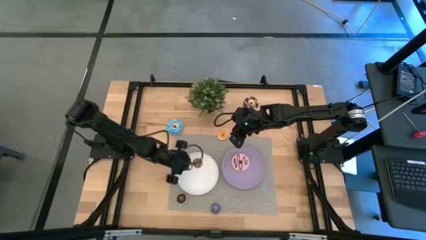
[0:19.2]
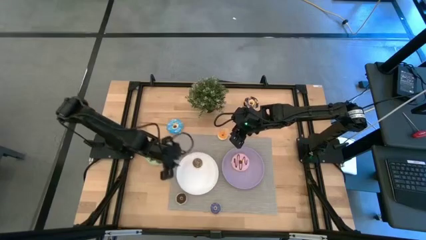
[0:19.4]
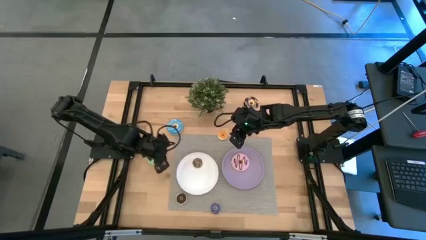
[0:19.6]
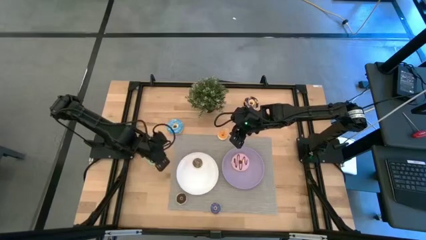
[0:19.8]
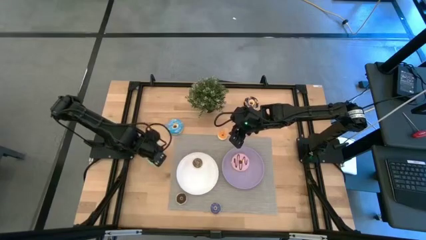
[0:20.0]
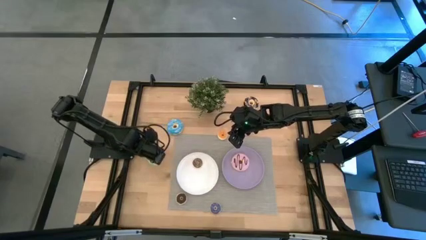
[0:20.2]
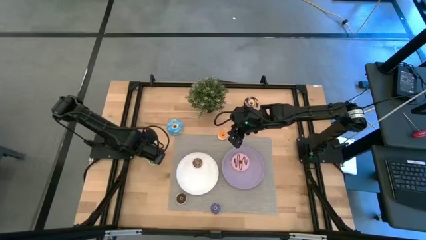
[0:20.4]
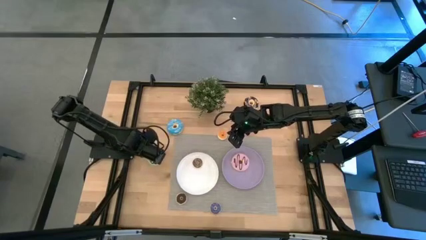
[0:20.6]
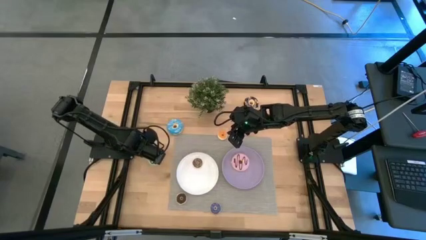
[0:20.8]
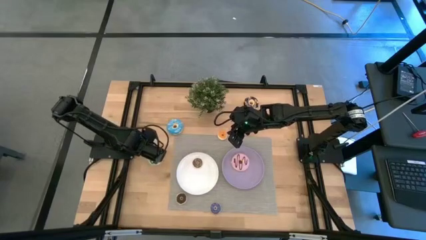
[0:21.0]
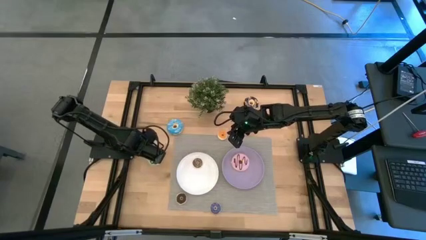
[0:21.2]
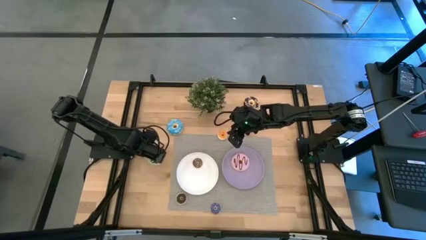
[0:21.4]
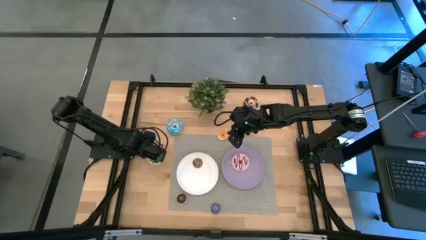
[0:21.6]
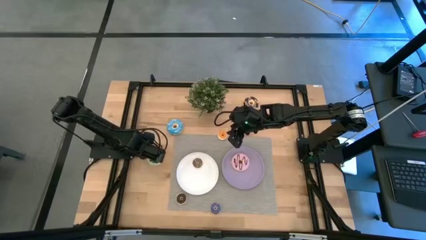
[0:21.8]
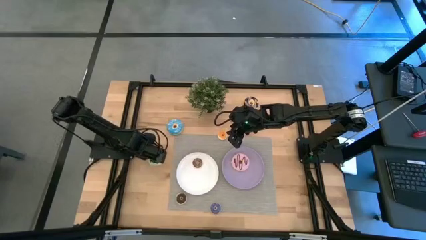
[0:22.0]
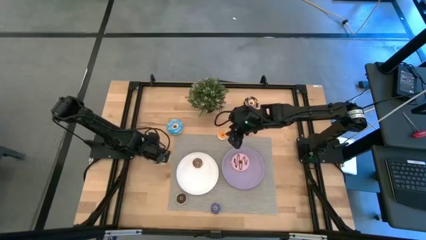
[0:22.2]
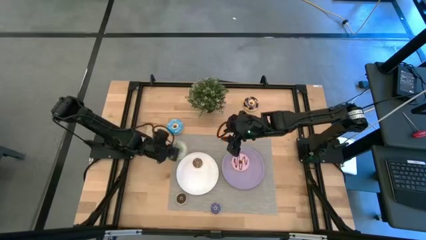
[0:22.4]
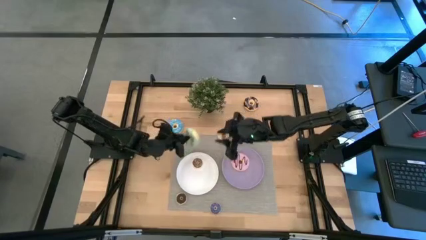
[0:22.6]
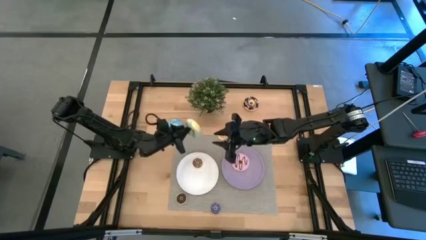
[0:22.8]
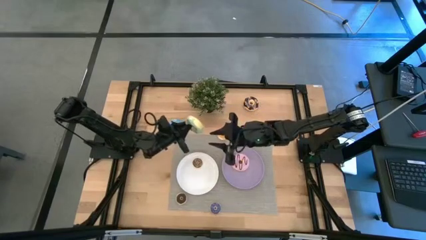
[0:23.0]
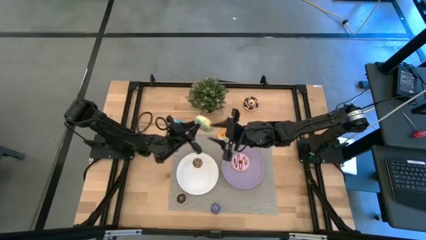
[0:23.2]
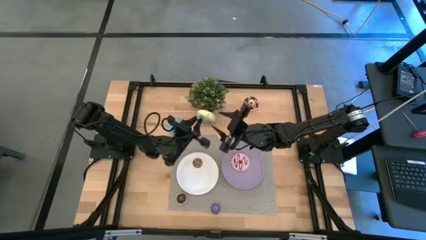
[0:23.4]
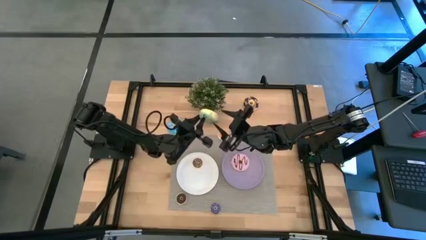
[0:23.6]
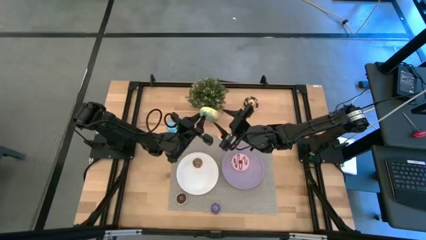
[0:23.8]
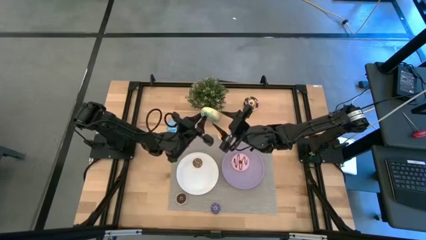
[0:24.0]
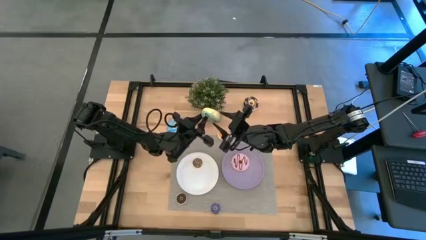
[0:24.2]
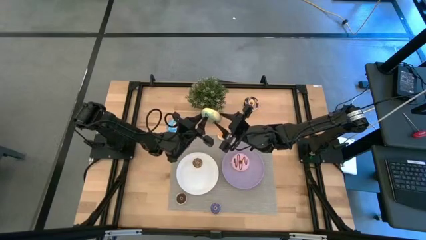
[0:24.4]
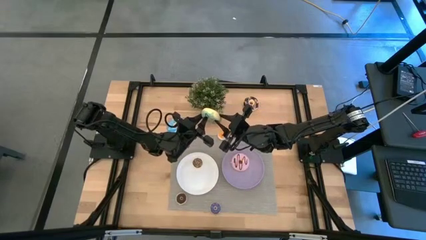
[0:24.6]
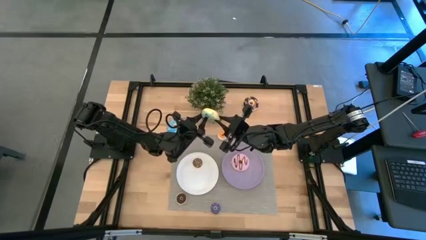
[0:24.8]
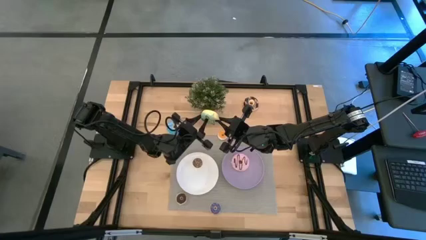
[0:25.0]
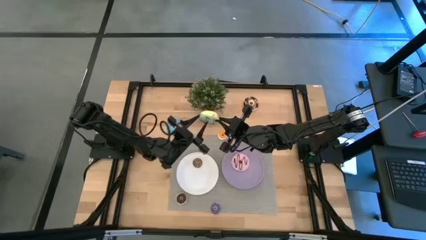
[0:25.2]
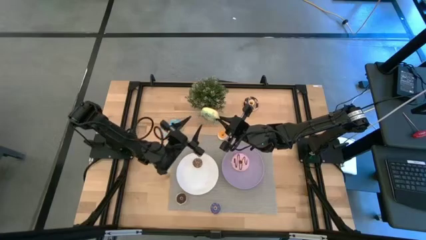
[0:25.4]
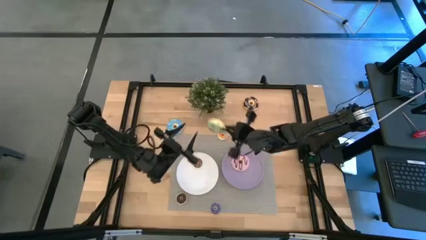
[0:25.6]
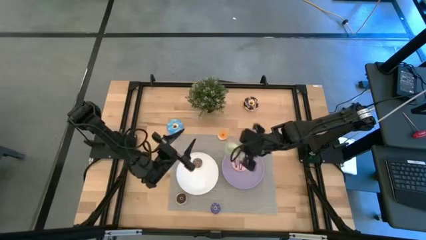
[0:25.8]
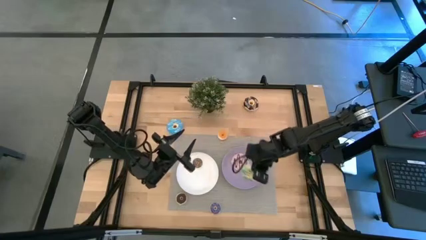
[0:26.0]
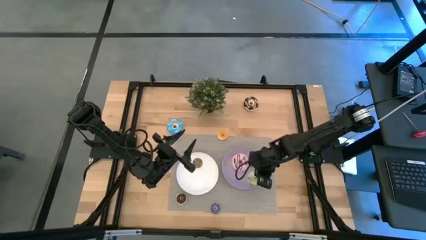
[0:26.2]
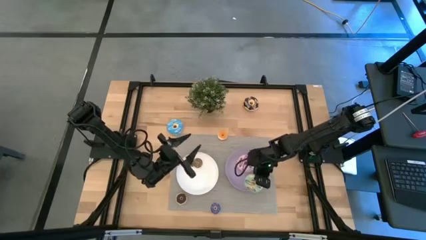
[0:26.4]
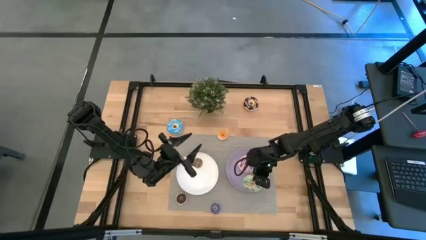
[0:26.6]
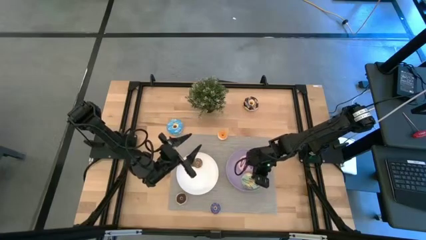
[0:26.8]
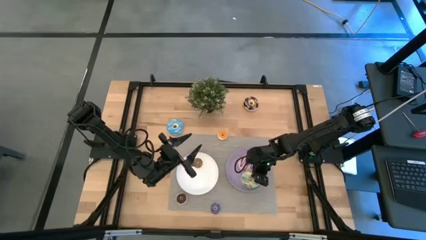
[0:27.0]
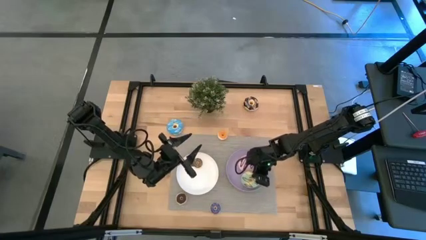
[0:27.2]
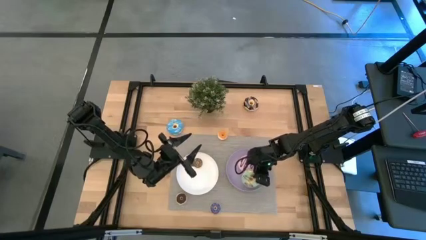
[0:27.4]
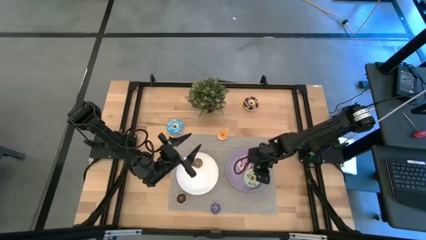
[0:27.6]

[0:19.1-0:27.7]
Task: Pick & Place donuts
Put the big green donut on the purple plate

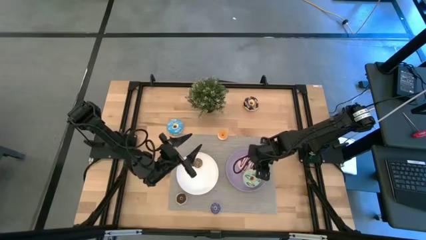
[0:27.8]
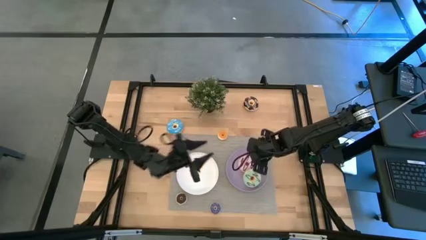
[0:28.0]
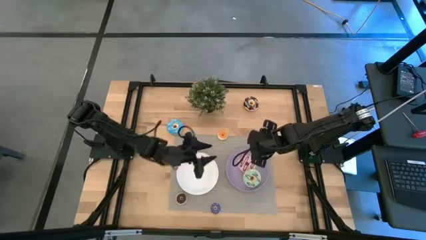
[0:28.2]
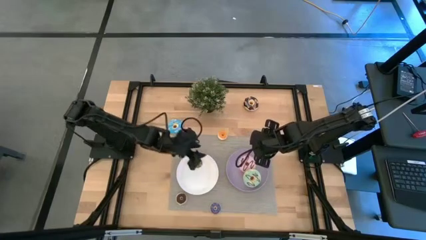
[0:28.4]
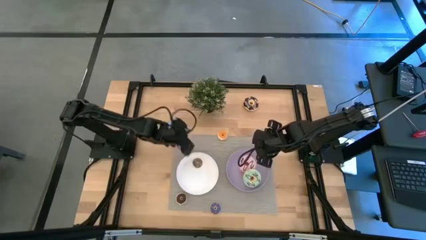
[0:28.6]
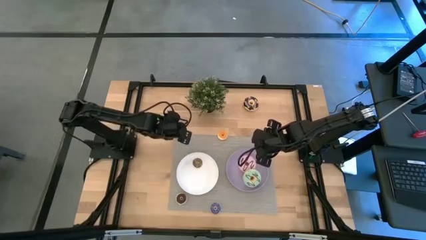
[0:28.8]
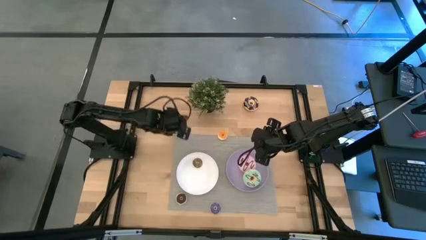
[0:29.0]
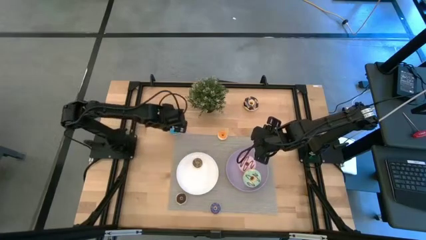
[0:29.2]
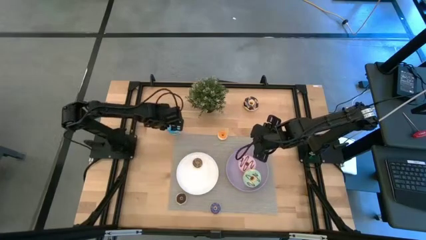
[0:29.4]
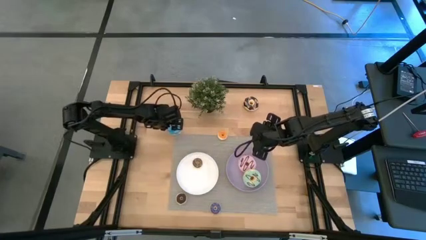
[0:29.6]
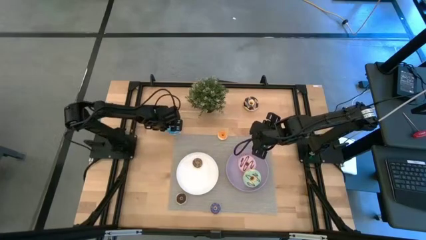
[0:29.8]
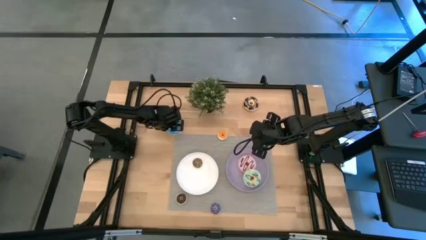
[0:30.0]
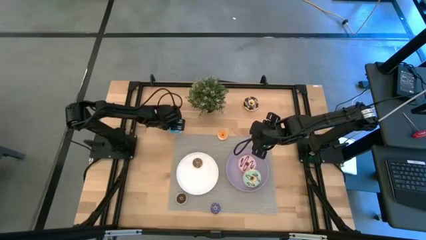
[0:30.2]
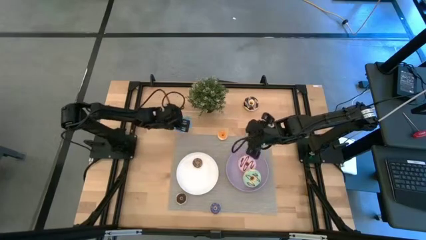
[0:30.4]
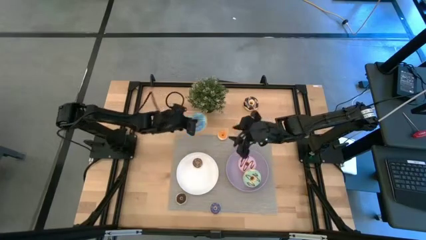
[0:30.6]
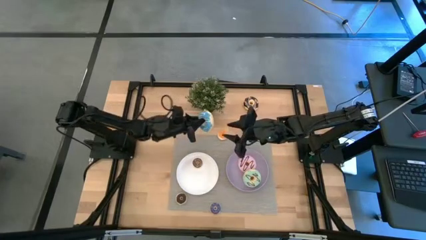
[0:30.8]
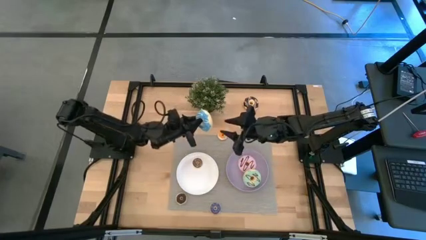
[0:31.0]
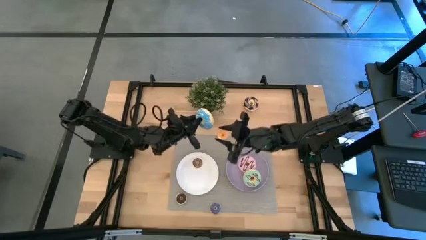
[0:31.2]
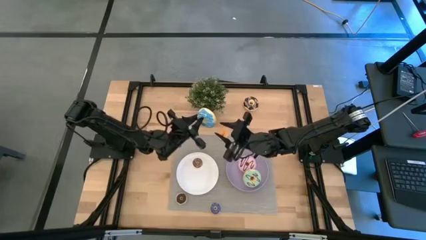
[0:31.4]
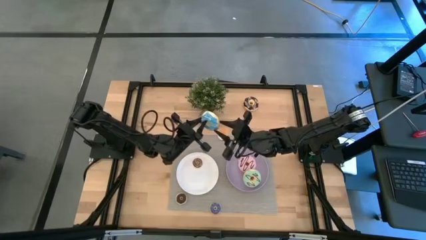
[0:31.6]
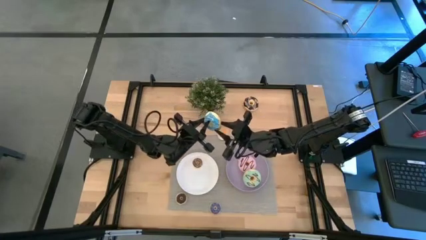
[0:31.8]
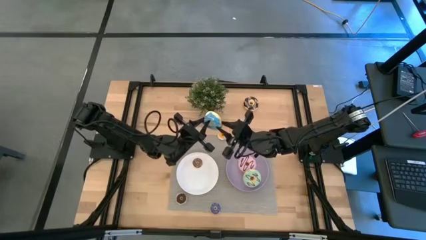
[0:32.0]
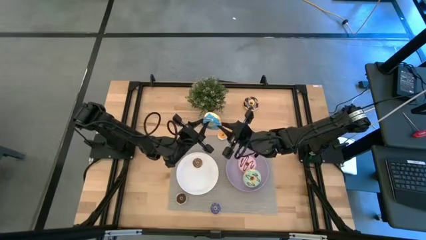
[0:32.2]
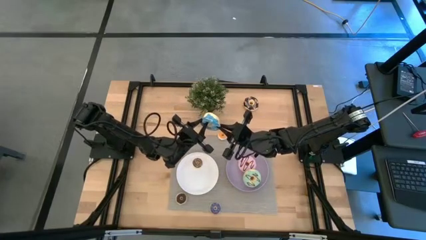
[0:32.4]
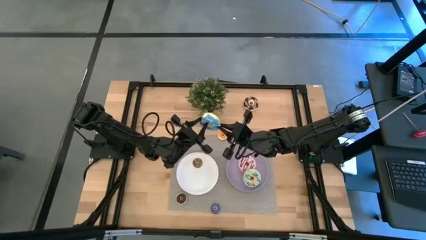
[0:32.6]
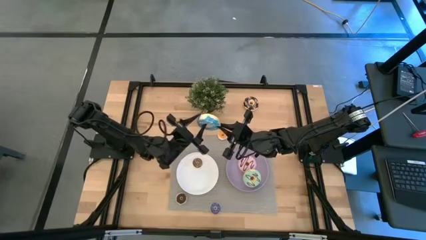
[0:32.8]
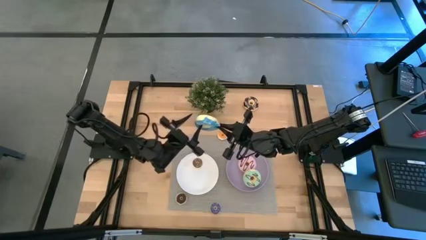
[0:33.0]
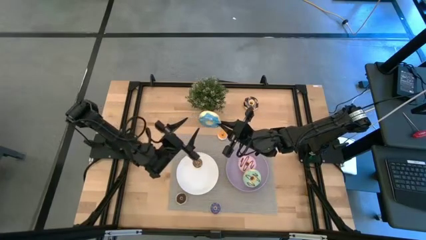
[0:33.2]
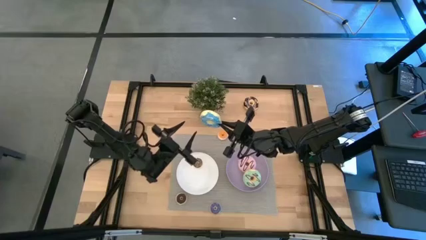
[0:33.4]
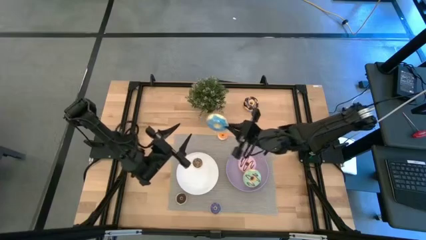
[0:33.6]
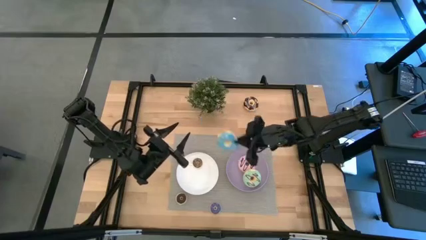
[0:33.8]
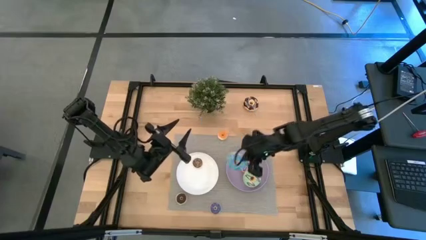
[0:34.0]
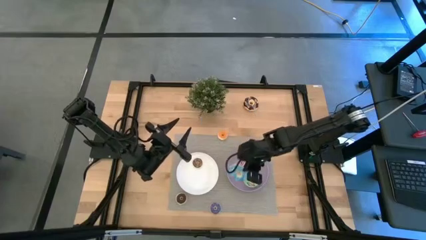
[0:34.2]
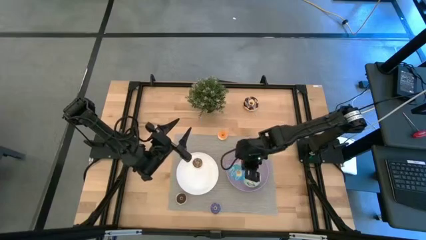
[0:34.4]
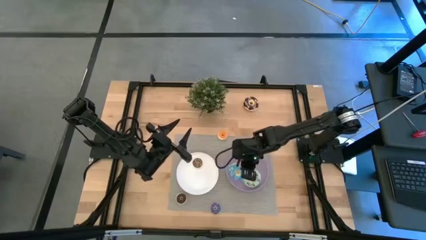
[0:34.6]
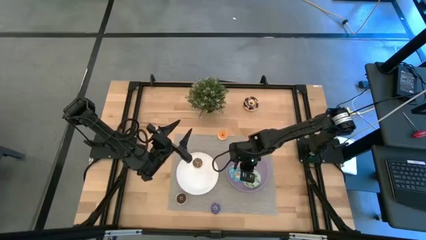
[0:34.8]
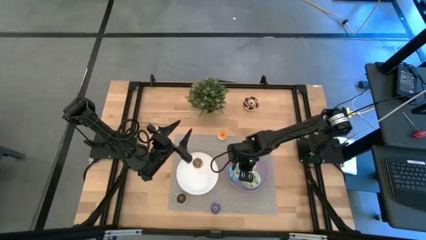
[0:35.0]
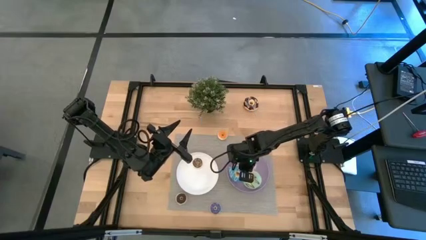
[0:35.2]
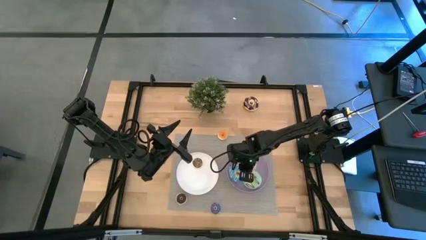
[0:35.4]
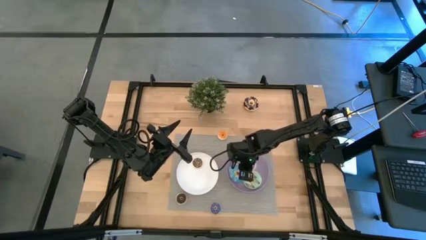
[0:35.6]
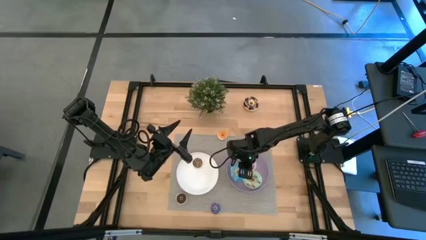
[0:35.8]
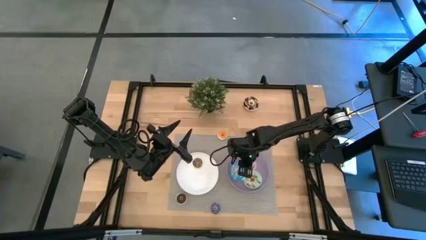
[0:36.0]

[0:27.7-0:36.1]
Put the big blue donut on the purple plate
